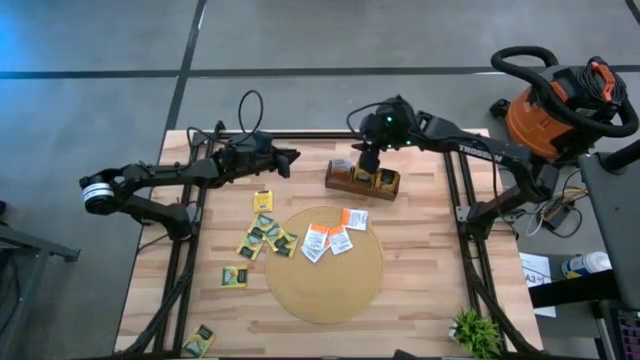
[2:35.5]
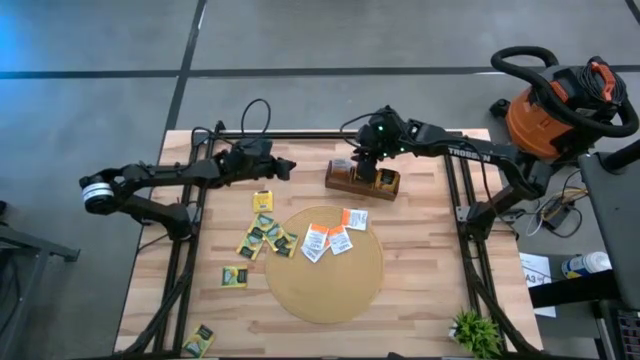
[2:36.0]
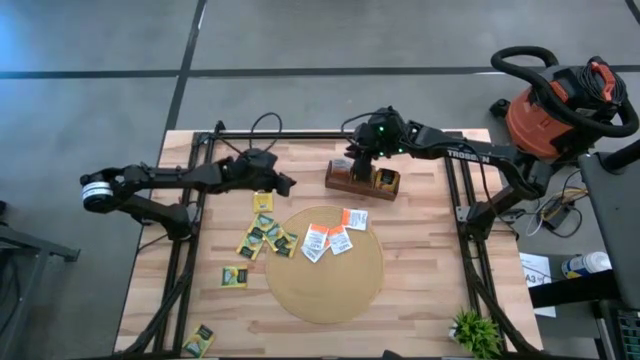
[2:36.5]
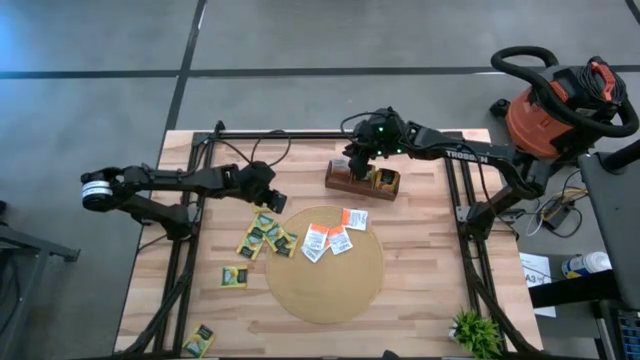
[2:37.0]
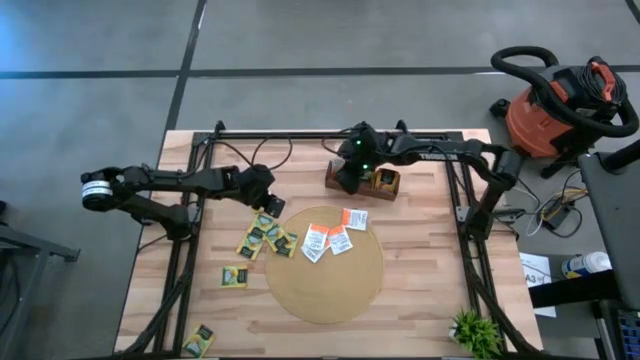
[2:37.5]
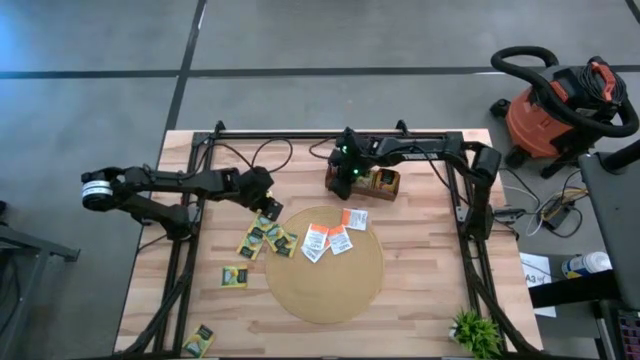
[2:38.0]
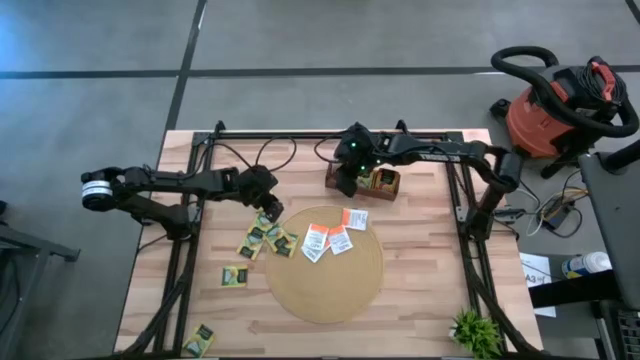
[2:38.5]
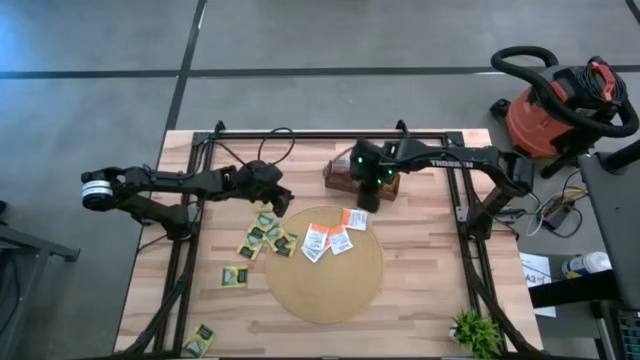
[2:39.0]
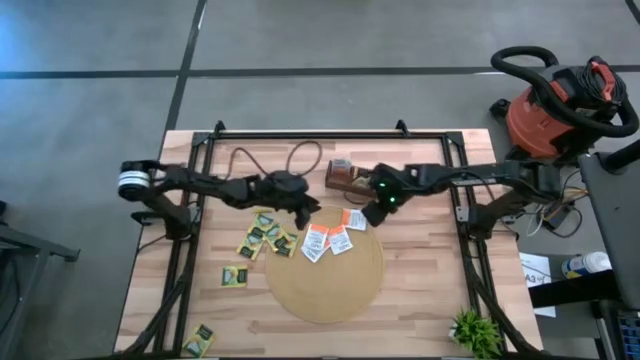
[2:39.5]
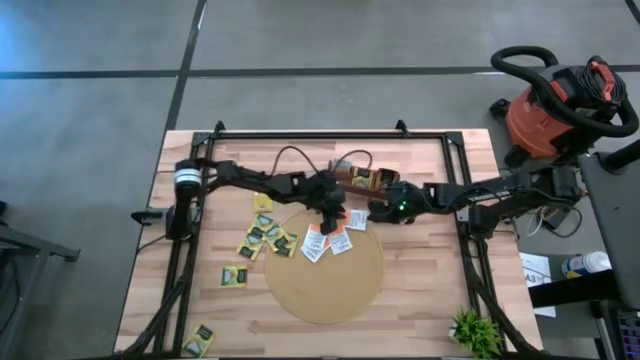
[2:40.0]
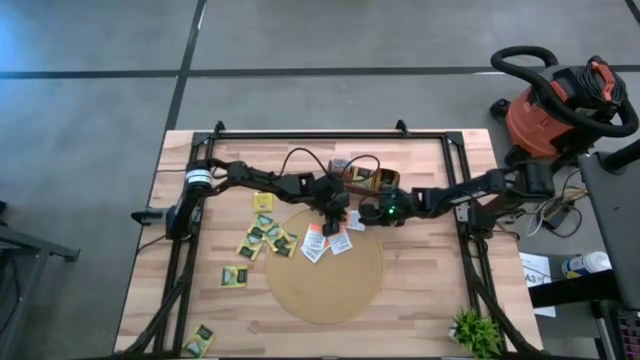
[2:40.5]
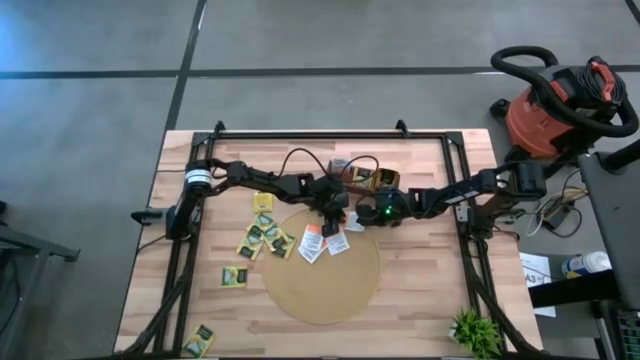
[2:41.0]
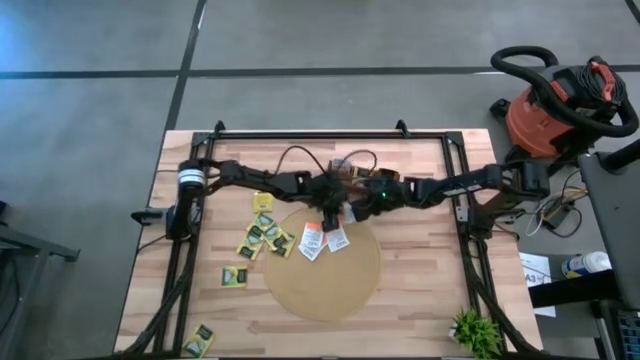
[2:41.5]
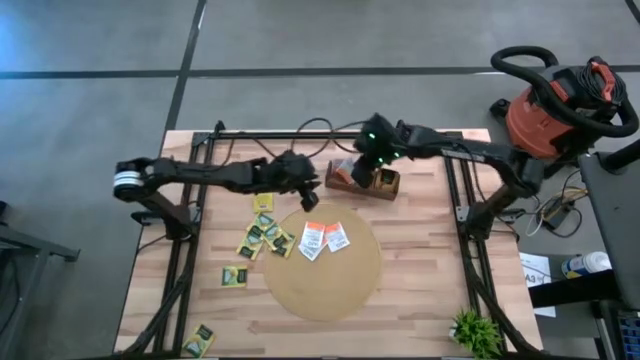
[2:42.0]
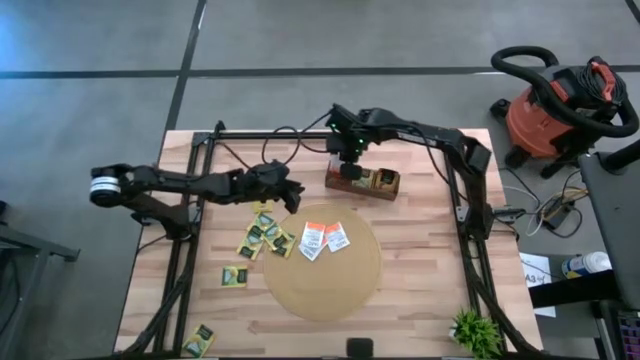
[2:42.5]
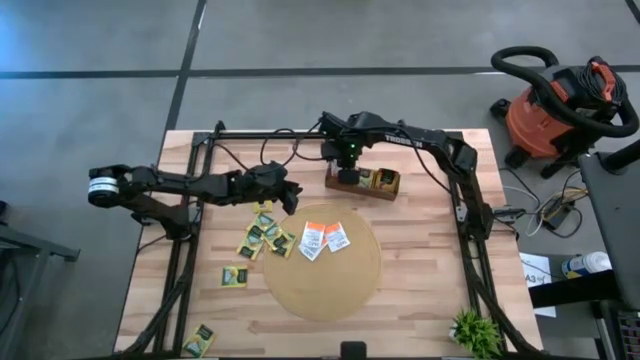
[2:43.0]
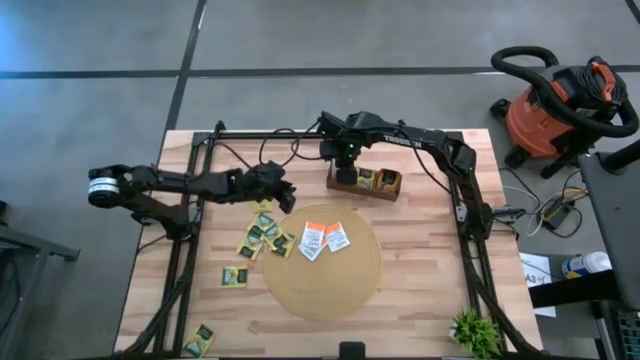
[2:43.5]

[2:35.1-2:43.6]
Task: Pick & Place Tea
Put the orange tea bag into the left section of the wooden organizer
